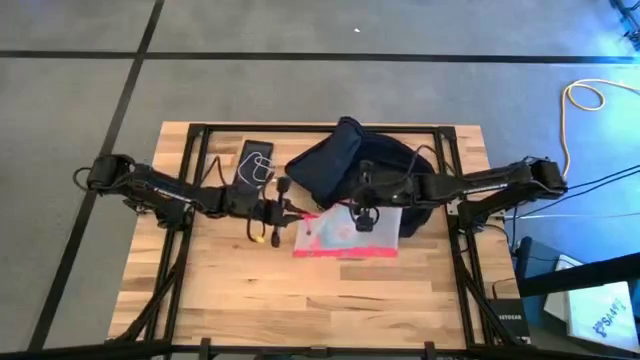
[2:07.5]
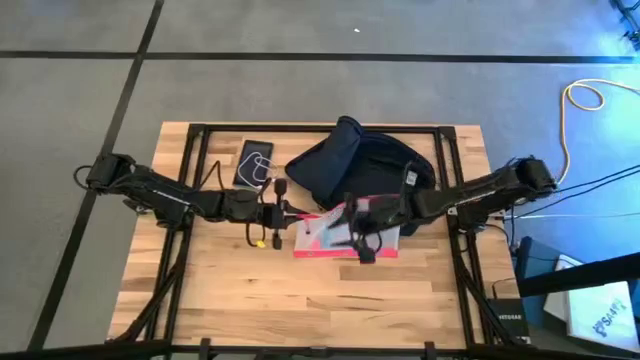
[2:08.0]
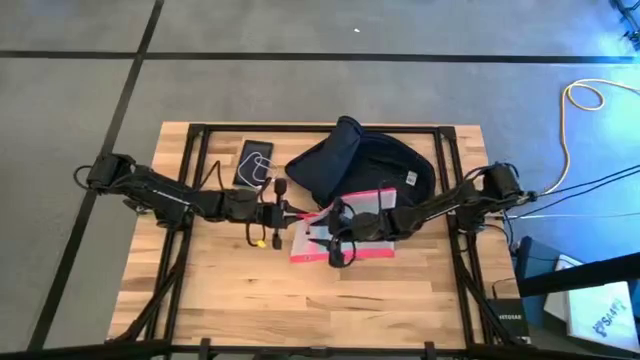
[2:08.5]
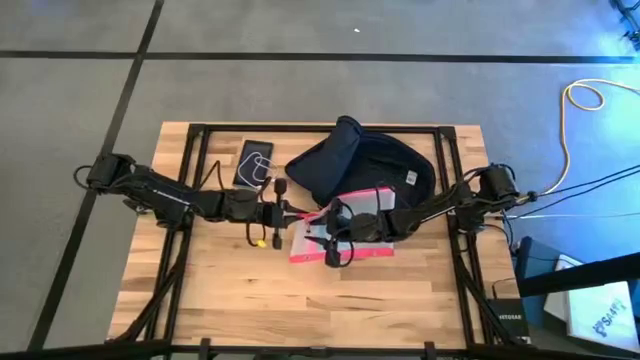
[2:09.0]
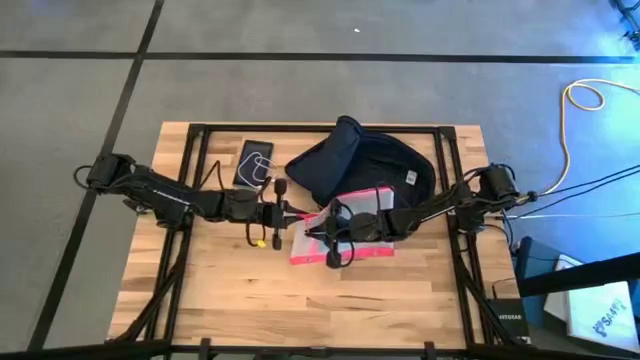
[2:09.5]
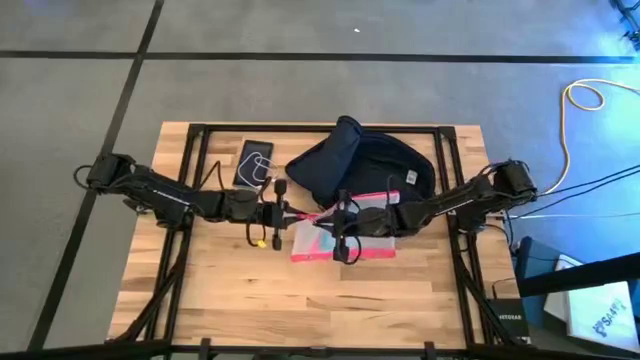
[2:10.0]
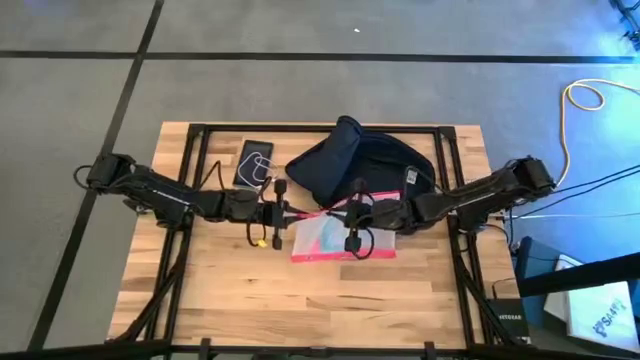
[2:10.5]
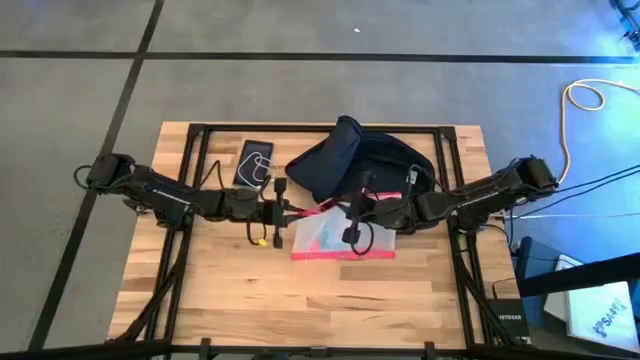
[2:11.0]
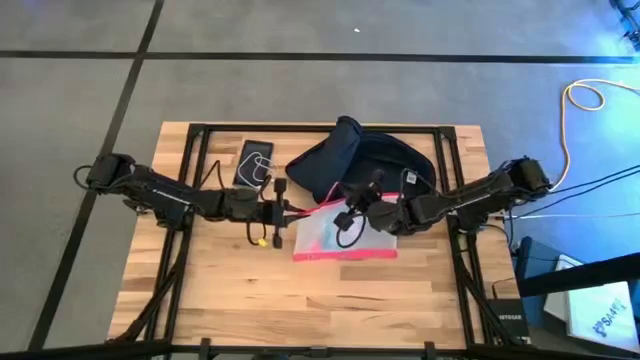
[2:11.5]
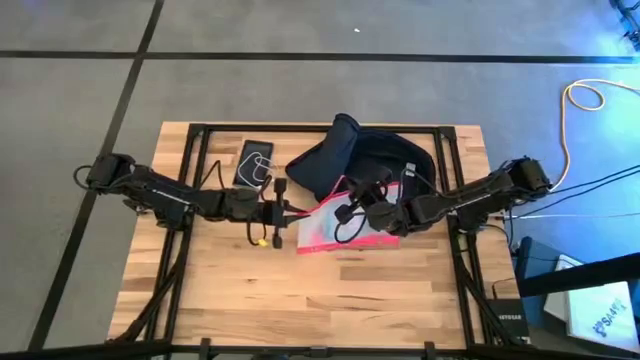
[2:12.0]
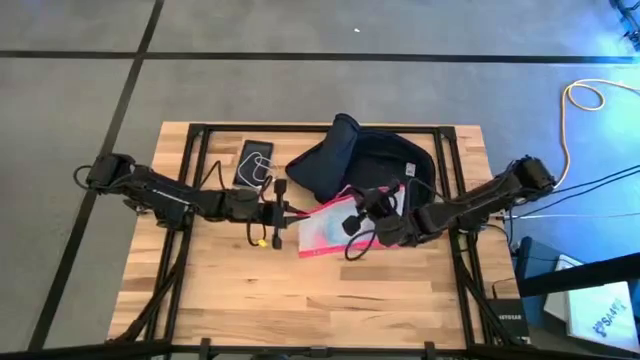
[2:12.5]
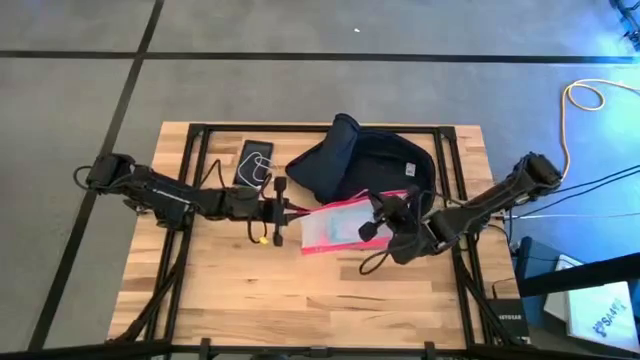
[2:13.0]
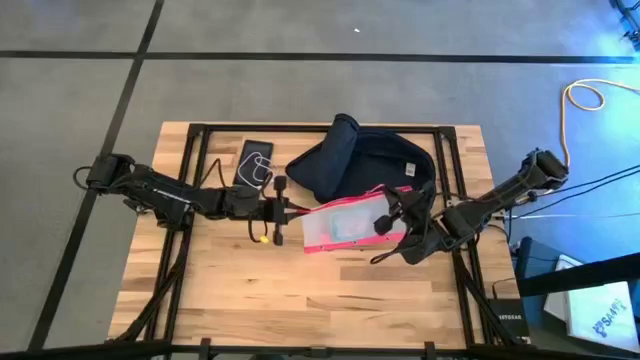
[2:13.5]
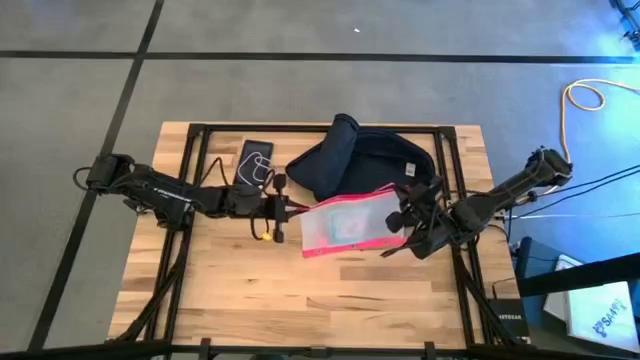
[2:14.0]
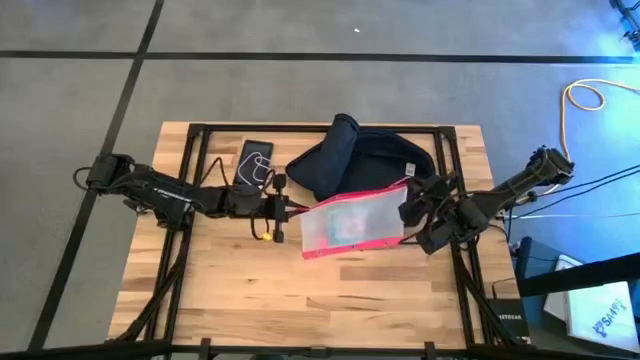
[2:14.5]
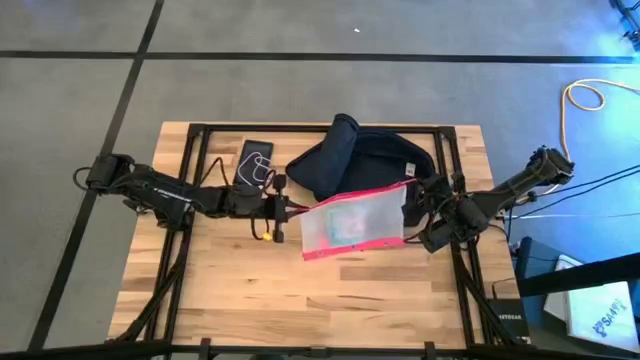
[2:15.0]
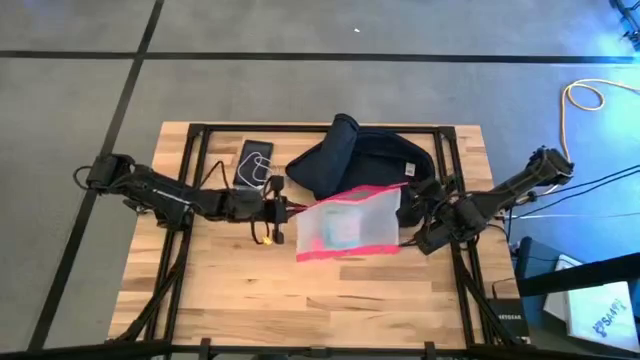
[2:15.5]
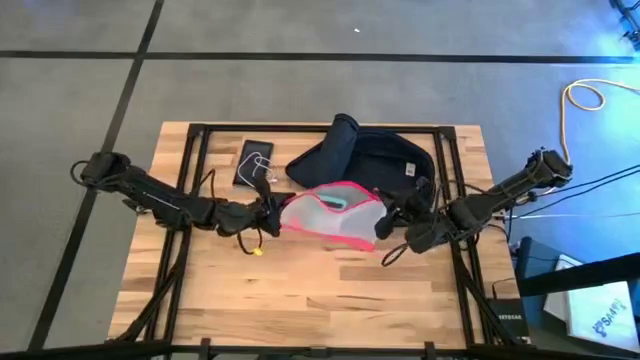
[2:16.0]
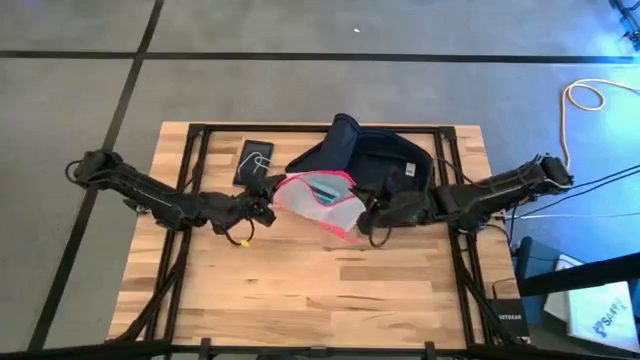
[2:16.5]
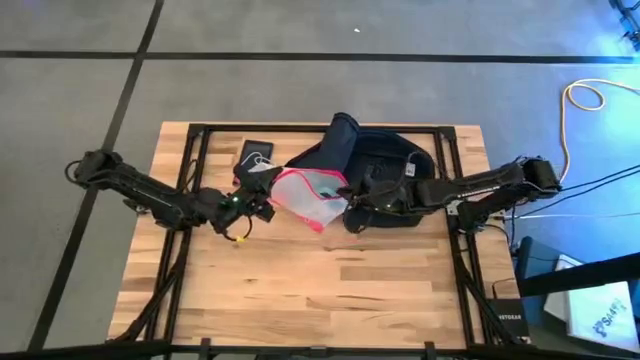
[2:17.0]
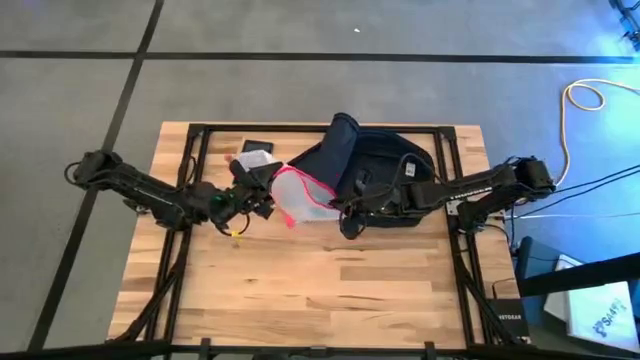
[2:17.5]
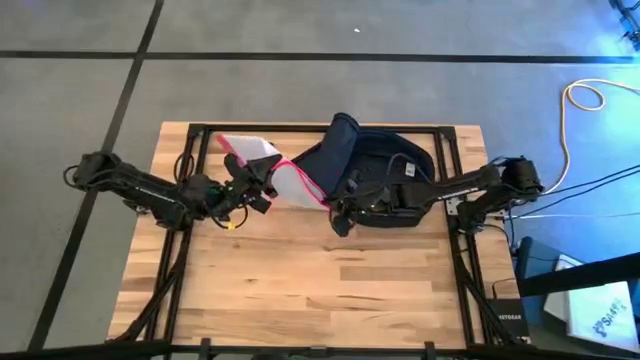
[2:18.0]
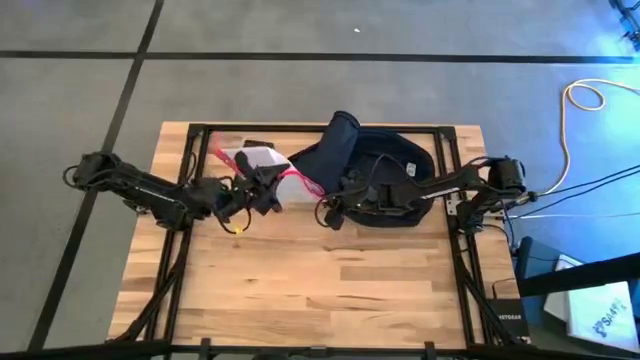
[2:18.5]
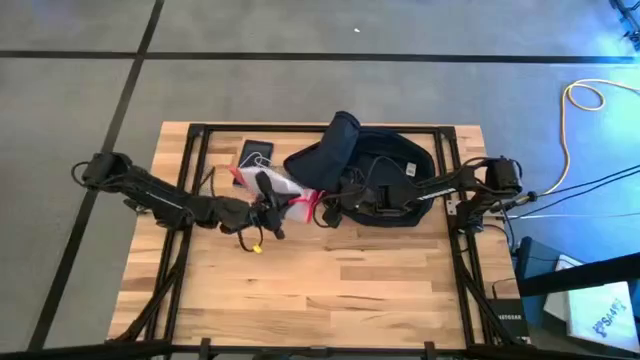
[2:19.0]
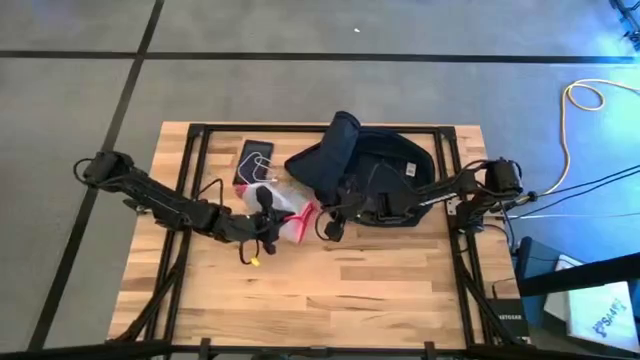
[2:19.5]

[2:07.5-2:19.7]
Task: Unpack backpack
Open the transparent zip bag

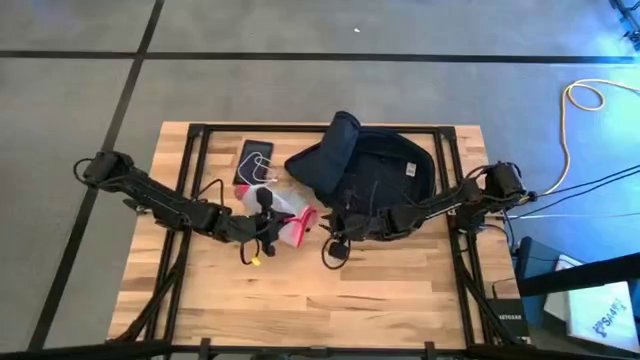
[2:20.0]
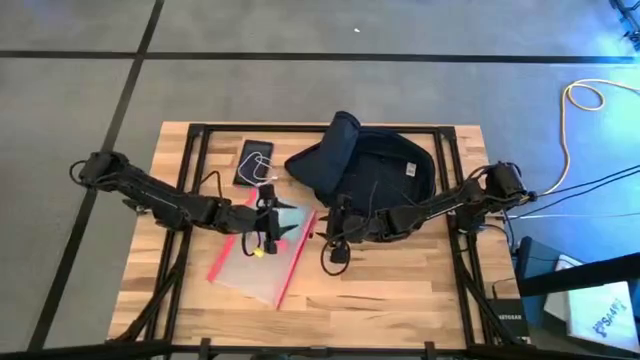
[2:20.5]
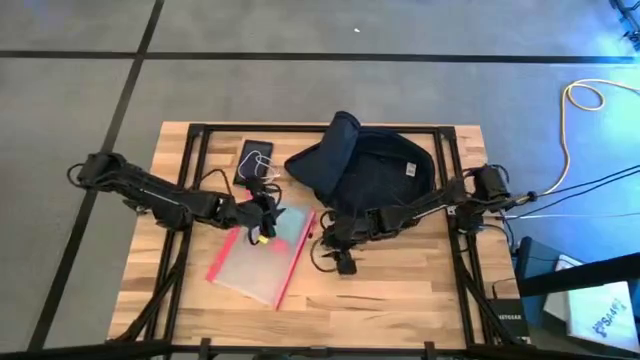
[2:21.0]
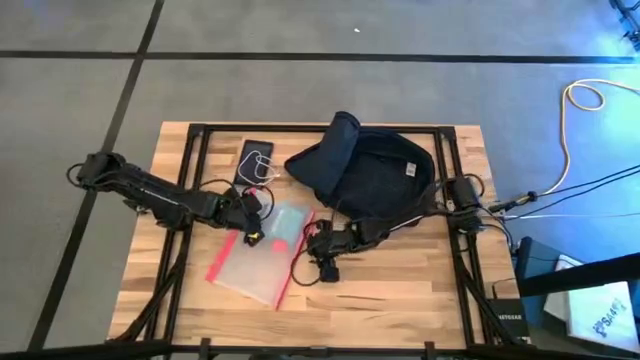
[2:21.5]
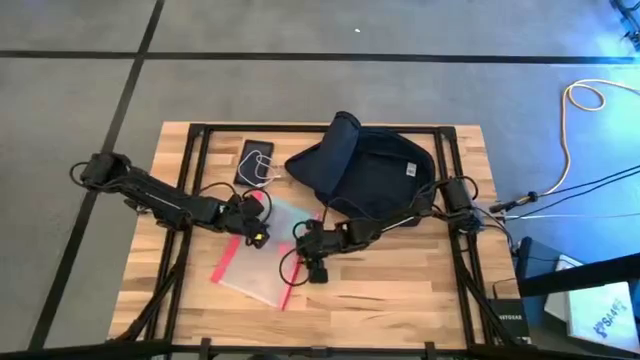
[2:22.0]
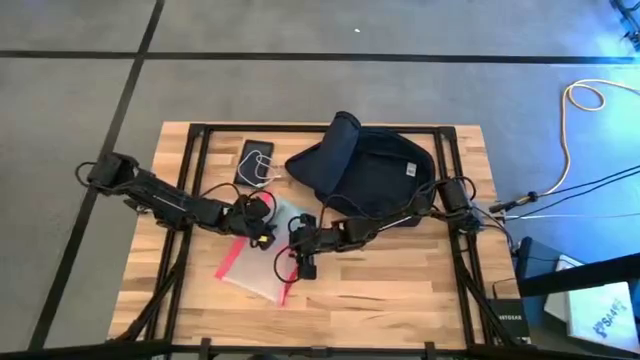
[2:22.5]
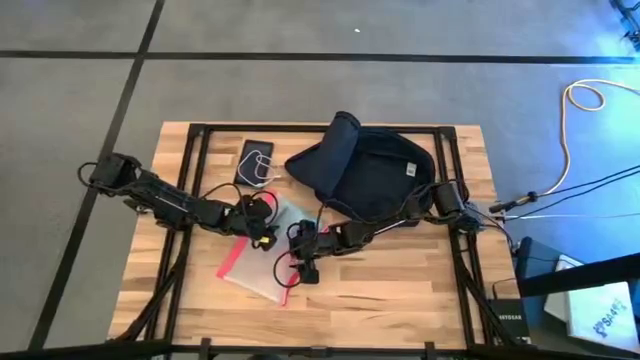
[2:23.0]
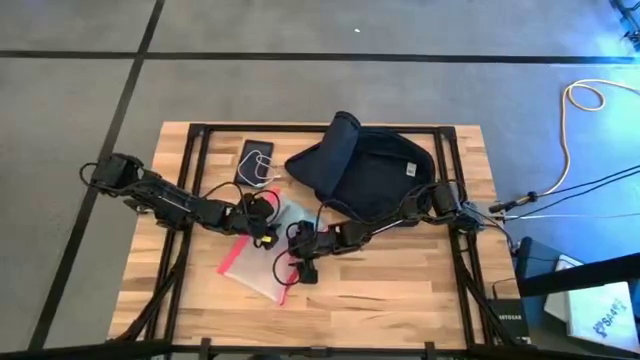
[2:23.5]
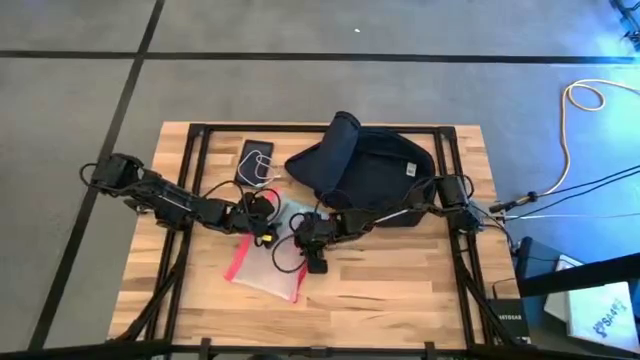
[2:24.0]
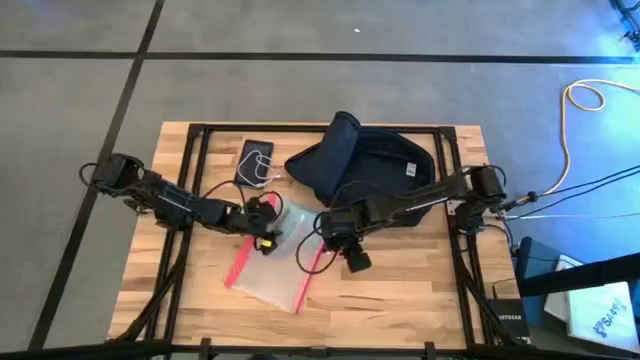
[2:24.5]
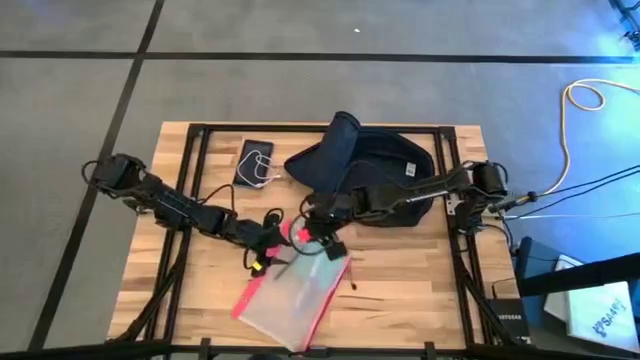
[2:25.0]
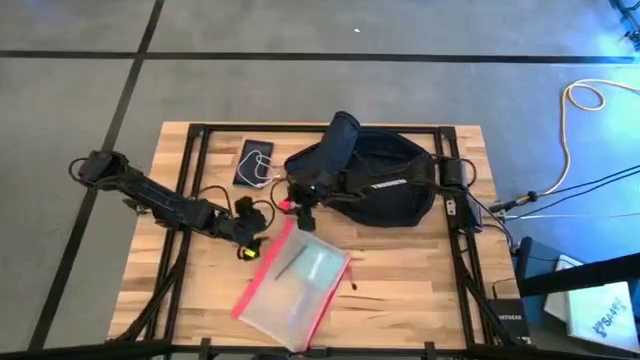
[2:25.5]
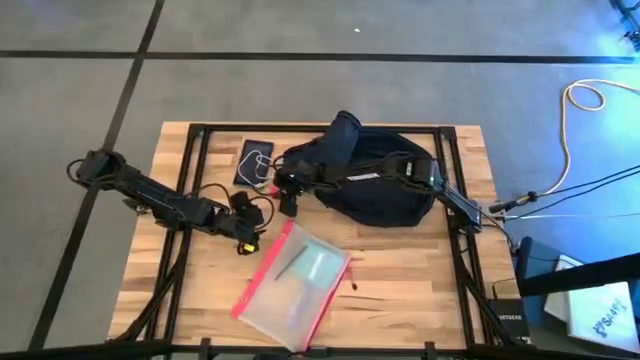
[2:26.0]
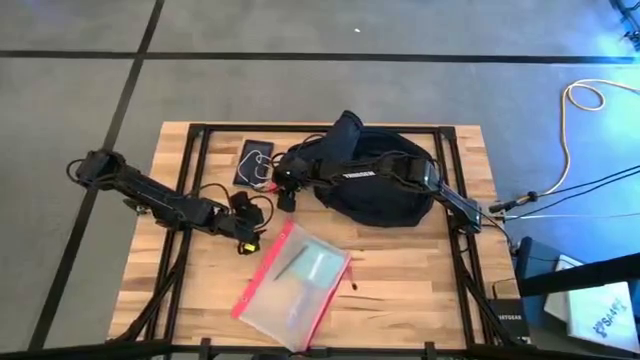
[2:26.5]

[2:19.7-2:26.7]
Remove the red charger adapter from the transparent zip bag

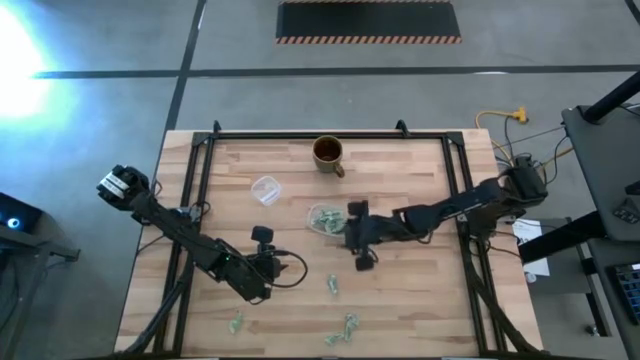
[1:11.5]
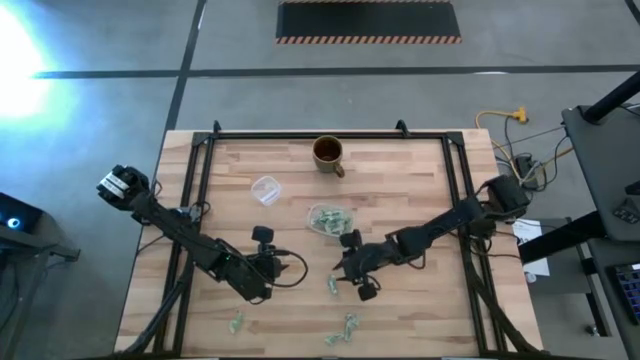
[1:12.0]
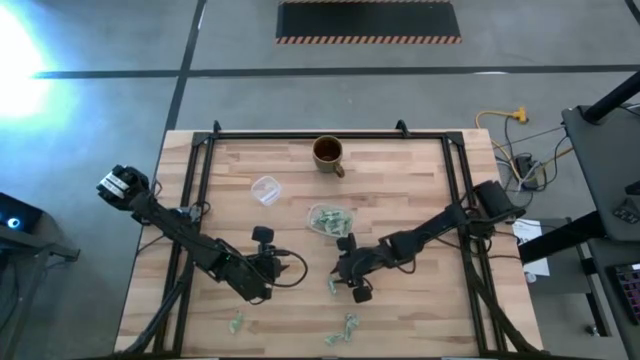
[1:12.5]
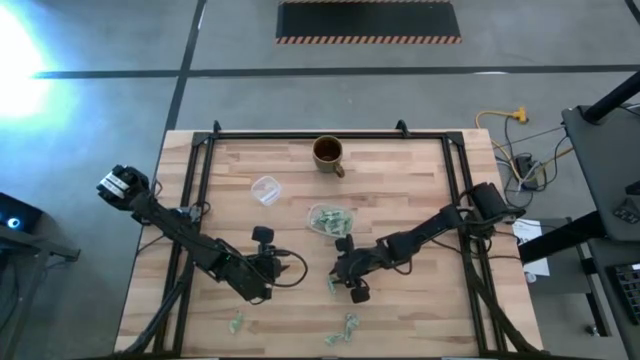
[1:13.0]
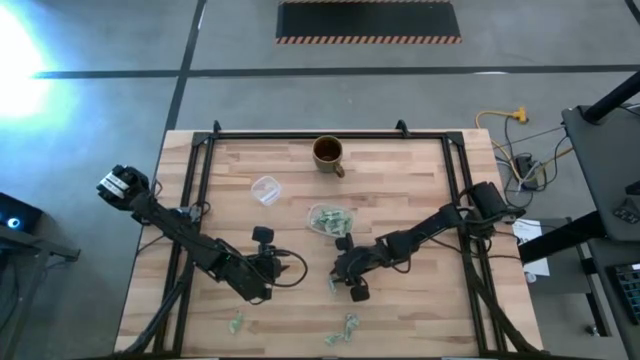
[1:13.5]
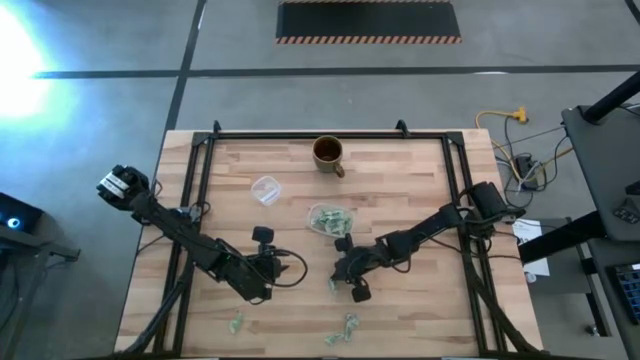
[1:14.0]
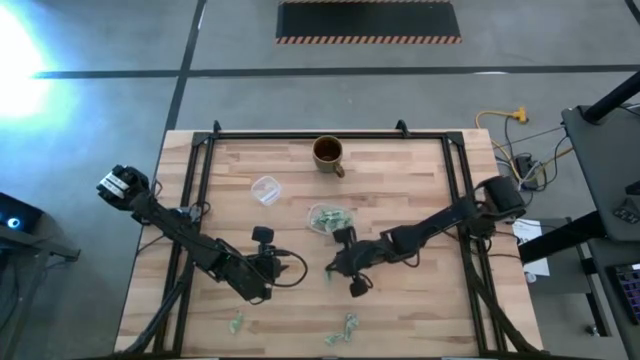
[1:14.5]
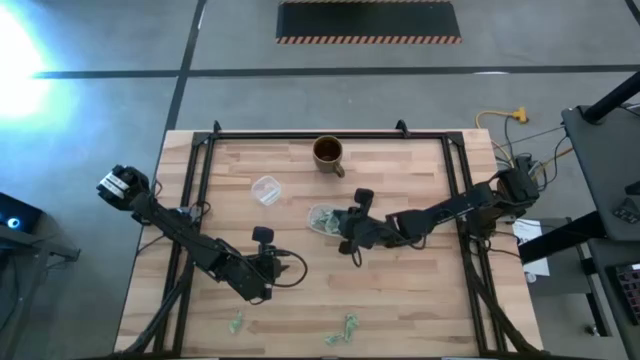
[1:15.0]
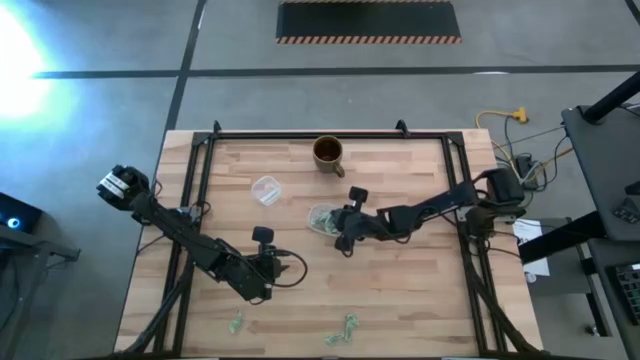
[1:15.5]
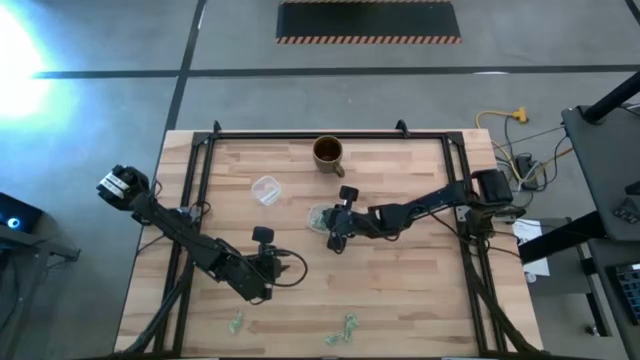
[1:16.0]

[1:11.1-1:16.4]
Task: Pick and place Stevia / Truvia into bins
Put the green stevia packet into the transparent container
